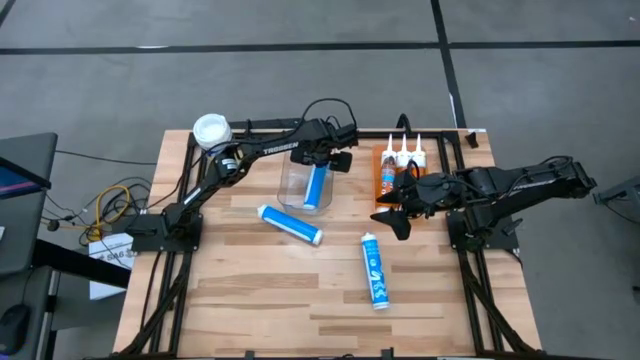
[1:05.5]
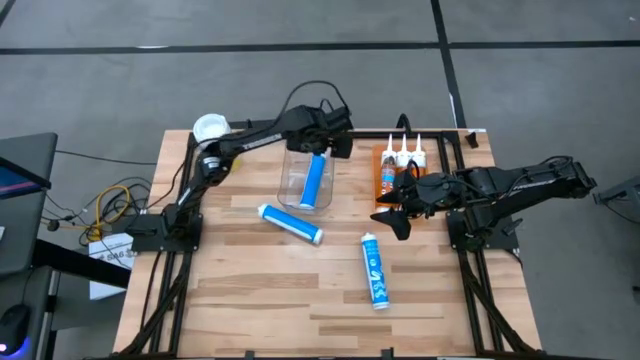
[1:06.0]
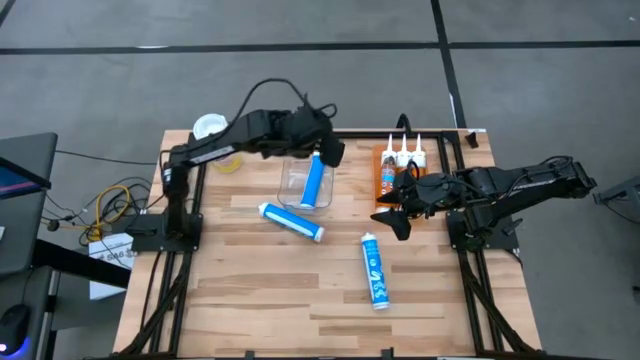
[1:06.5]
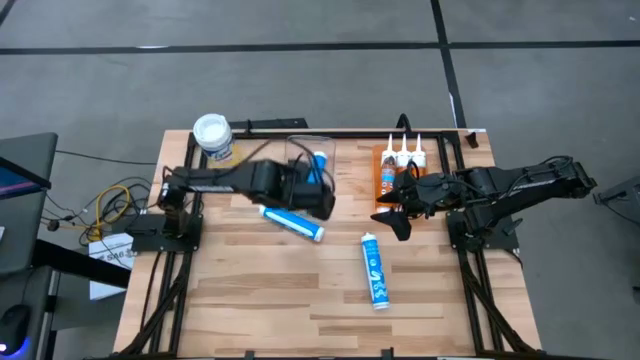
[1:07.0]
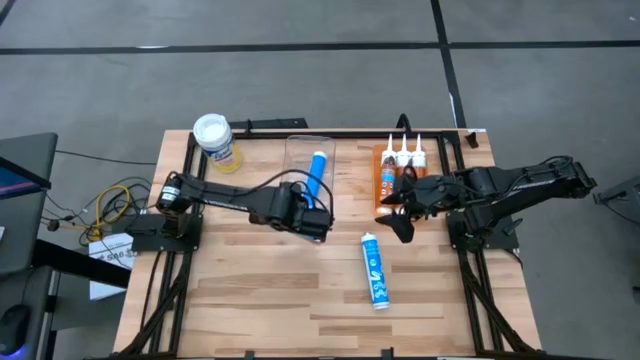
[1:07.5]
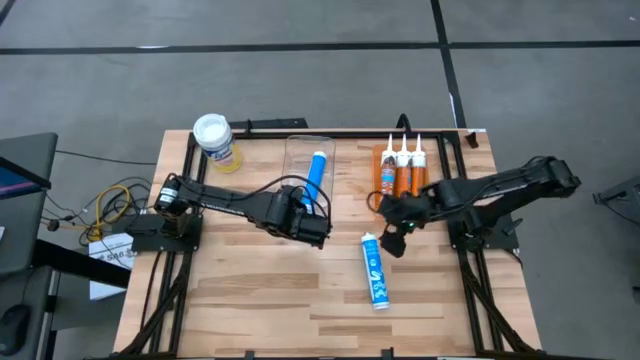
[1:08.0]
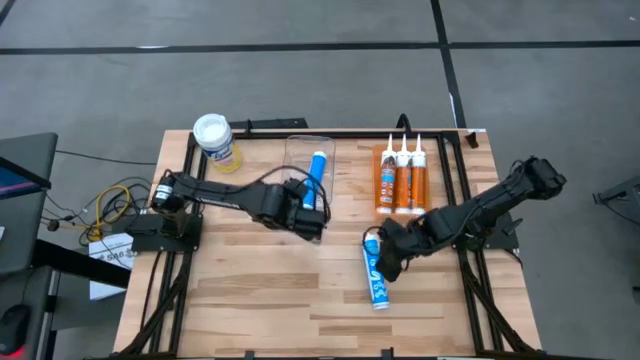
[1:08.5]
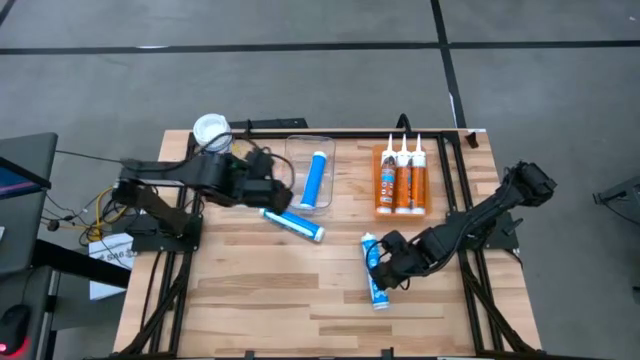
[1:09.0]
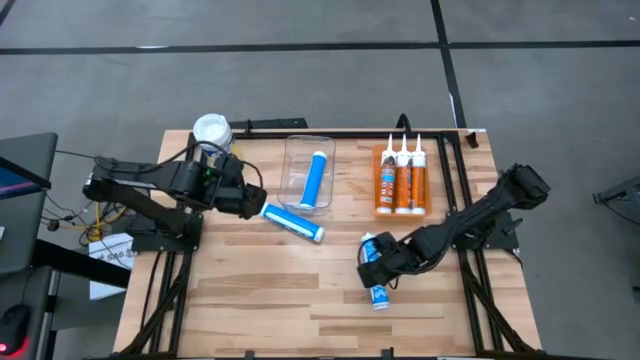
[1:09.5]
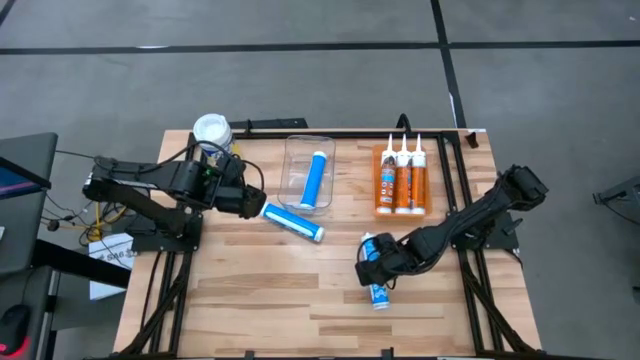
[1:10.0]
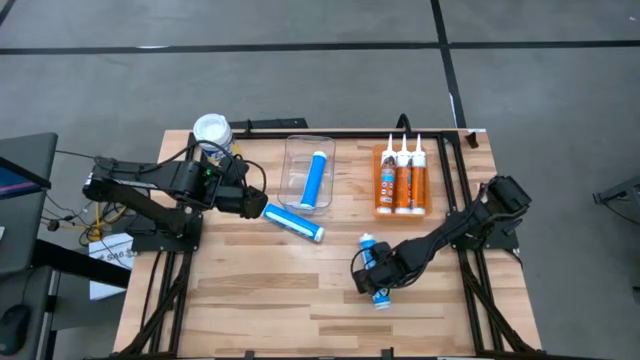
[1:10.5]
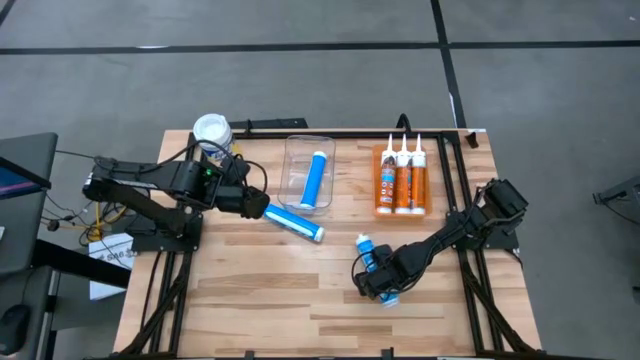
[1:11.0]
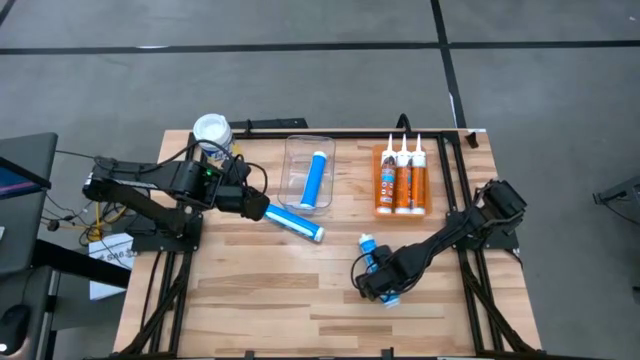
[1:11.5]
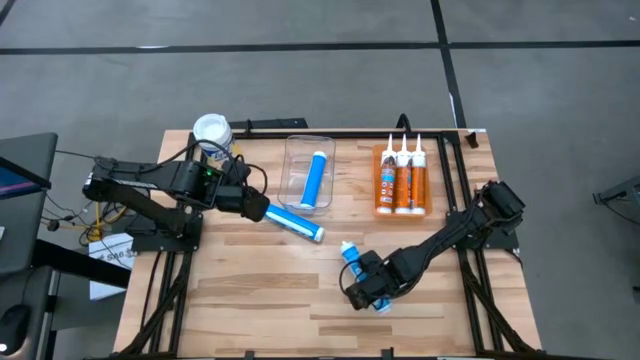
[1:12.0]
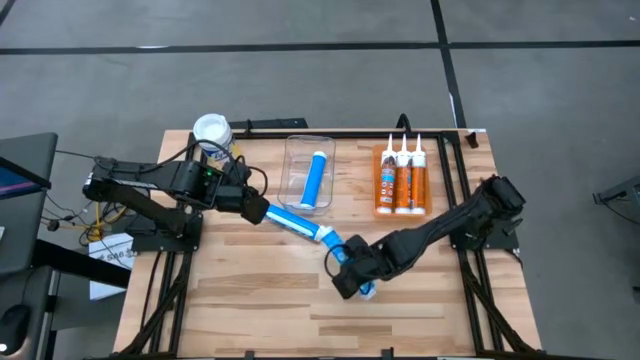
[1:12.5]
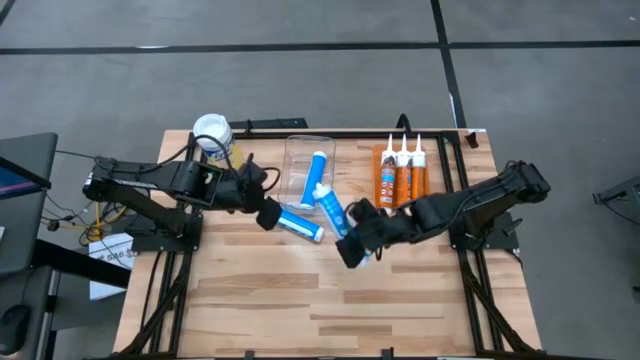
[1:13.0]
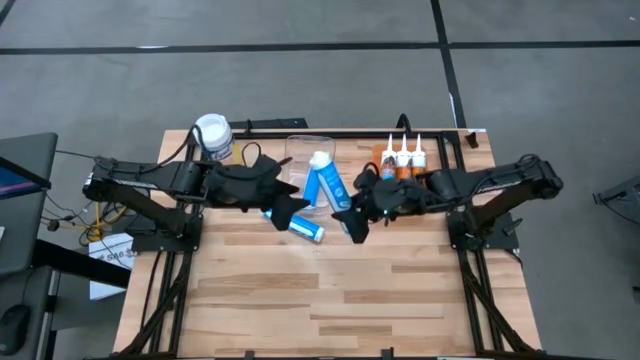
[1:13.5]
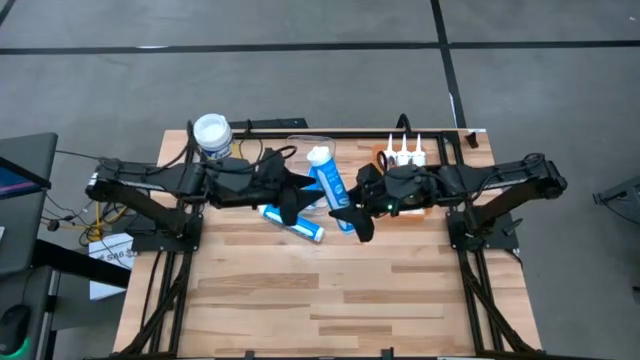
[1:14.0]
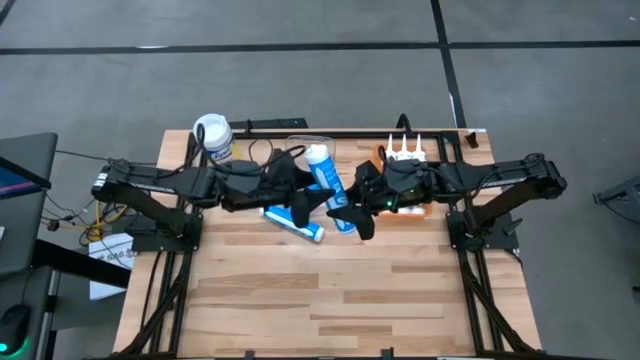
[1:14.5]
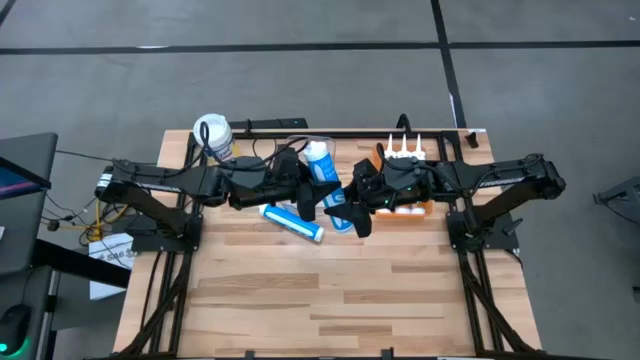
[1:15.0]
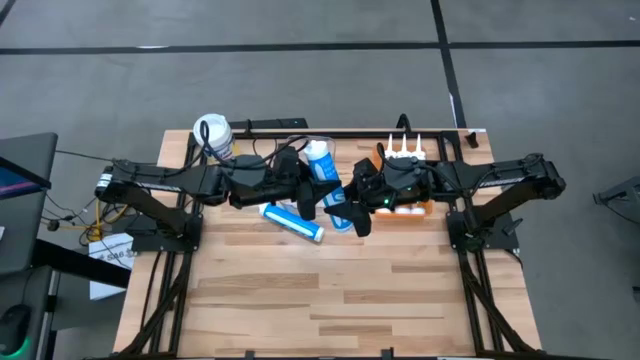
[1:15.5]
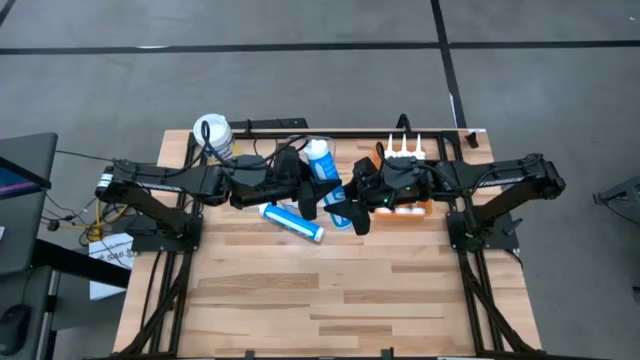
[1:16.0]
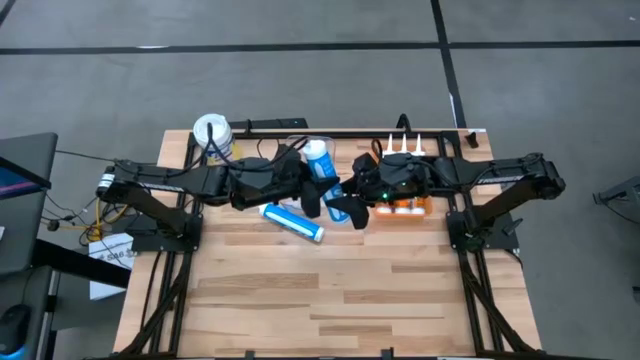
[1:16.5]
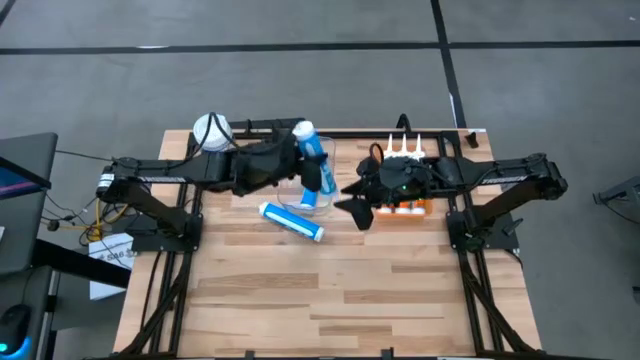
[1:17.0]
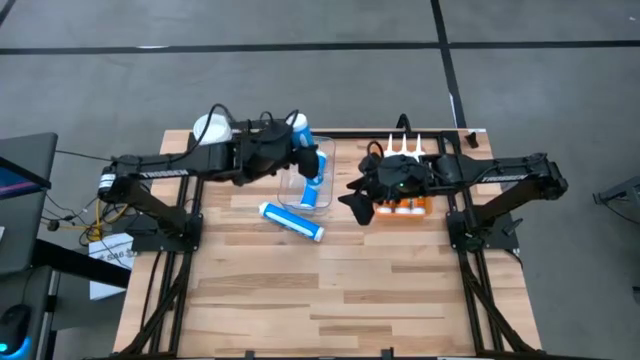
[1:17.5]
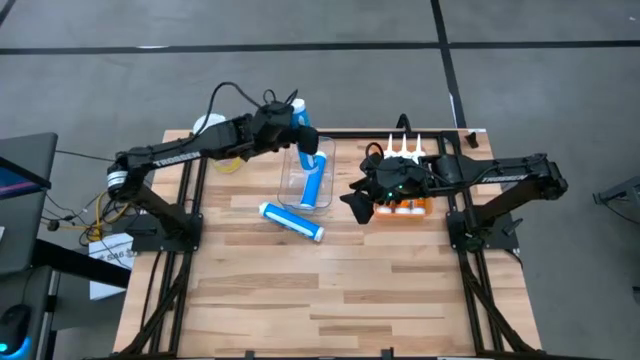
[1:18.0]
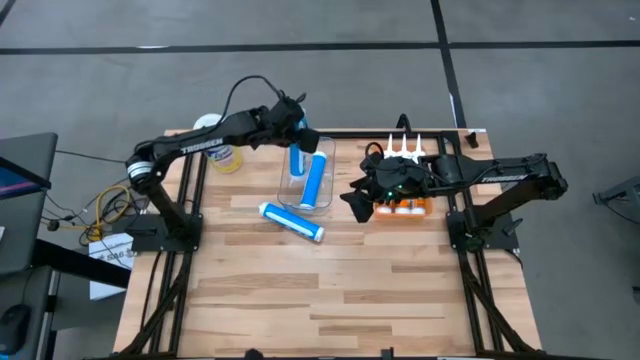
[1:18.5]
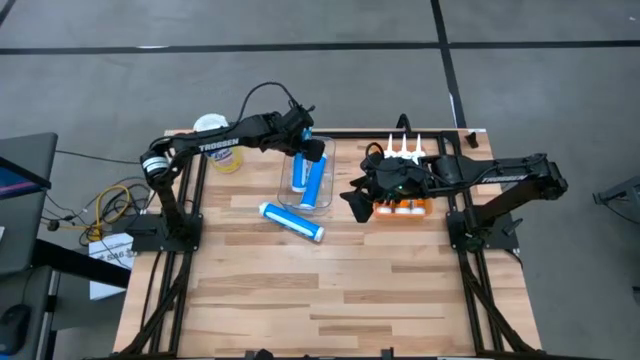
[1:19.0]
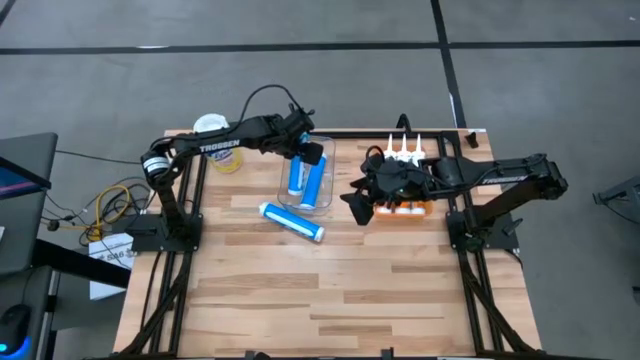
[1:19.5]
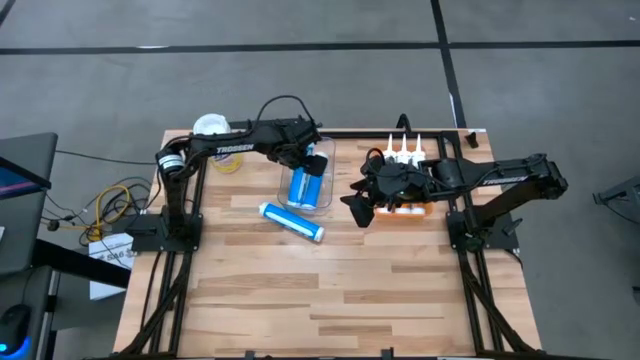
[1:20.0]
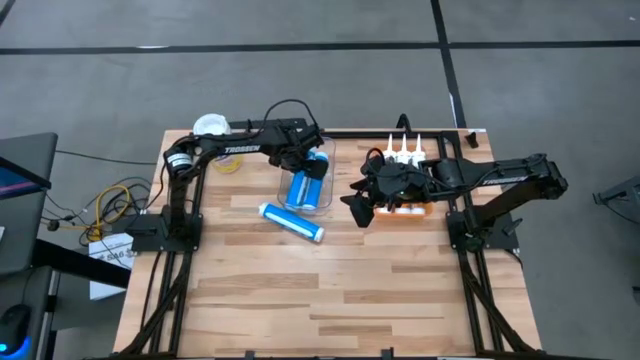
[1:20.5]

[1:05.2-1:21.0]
Task: Pick & place silicon tubes, Sealant and Lysol wipes
Put the right blue sealant into the transparent bin

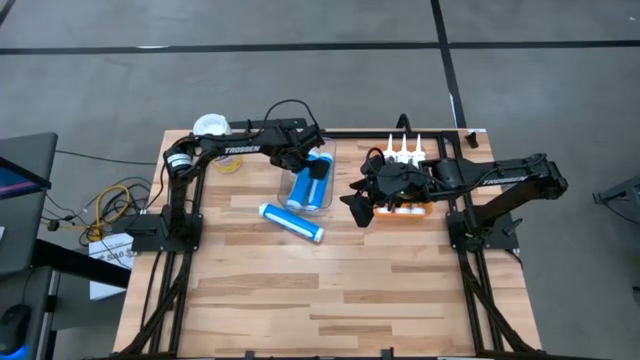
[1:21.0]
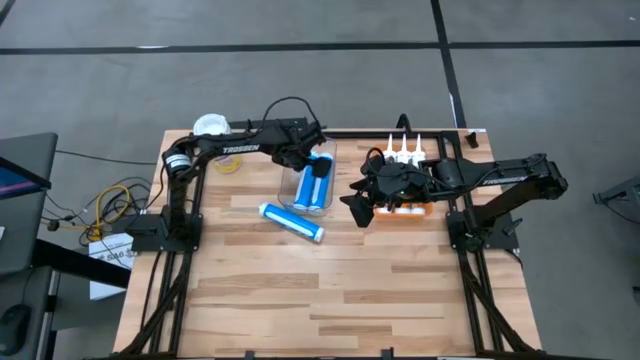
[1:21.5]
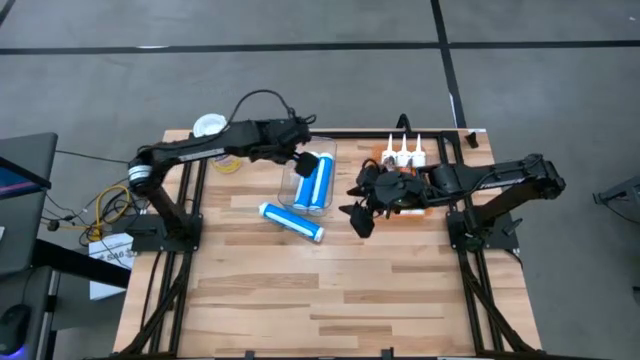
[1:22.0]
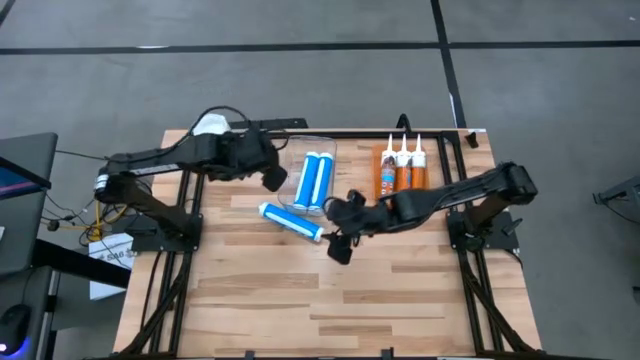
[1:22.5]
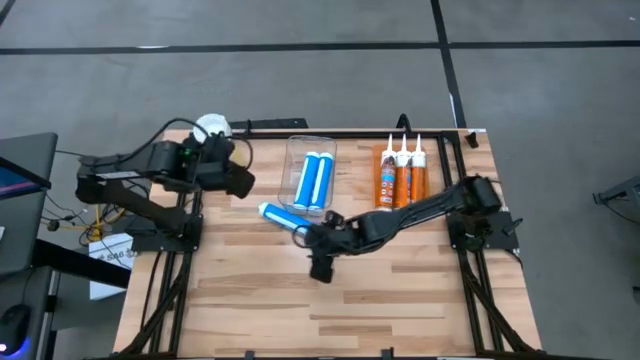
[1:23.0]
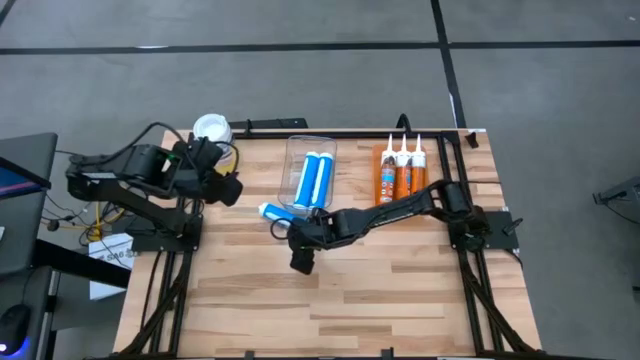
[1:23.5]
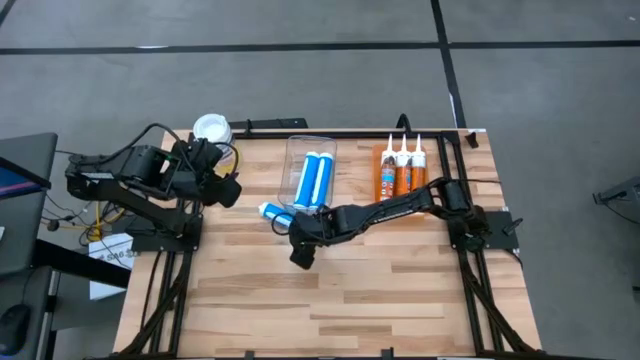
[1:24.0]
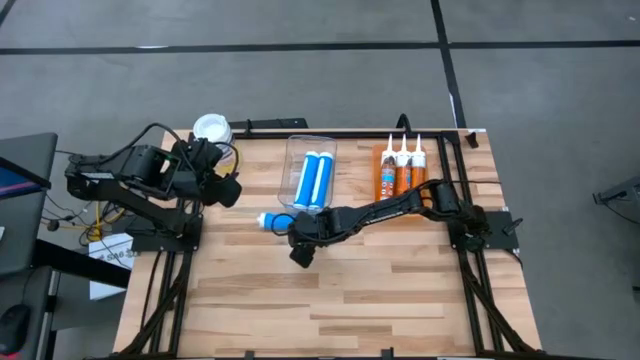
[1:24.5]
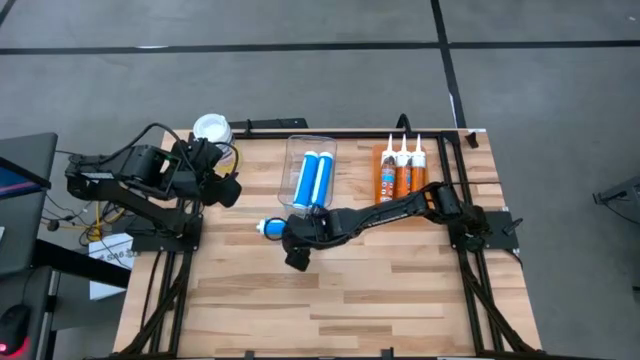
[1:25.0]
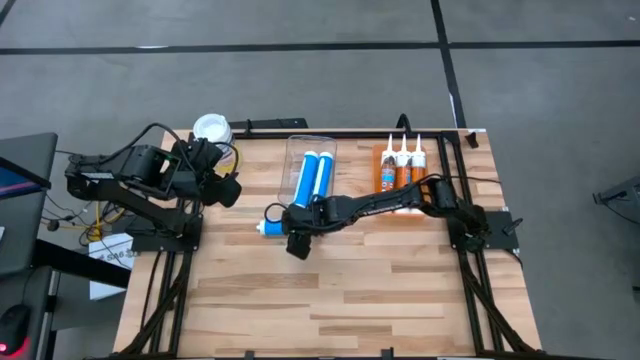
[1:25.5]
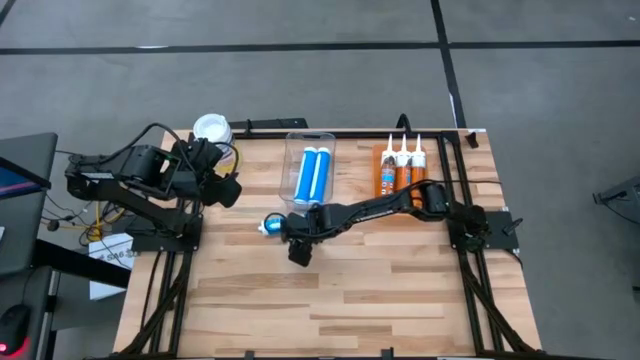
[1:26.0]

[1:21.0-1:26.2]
Put the blue sealant into the transparent bin

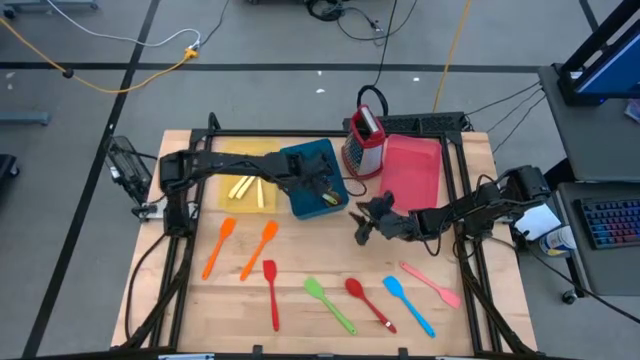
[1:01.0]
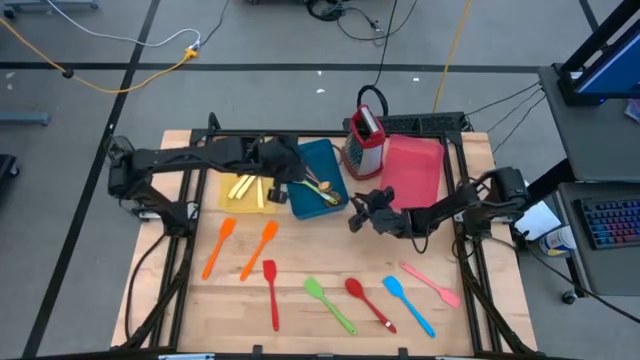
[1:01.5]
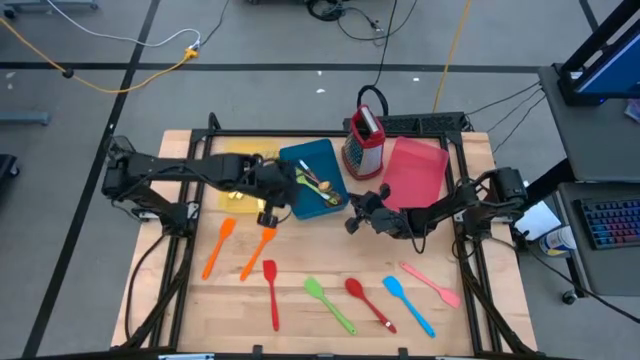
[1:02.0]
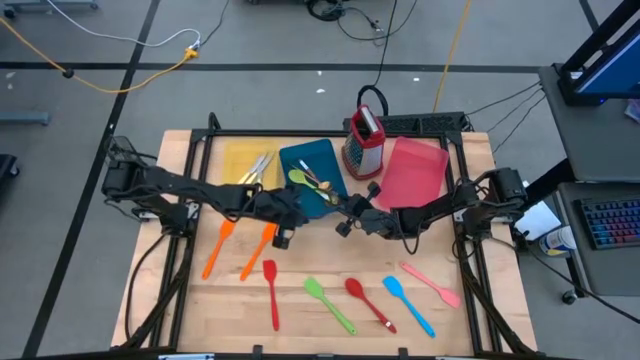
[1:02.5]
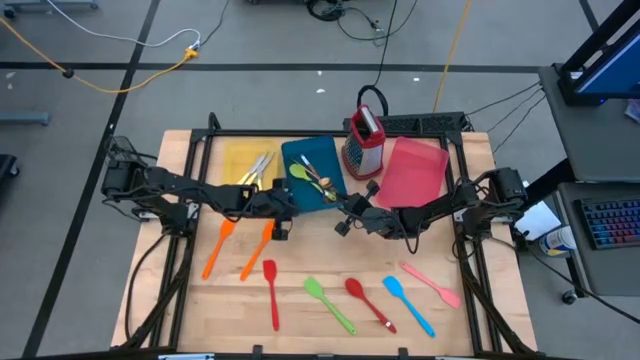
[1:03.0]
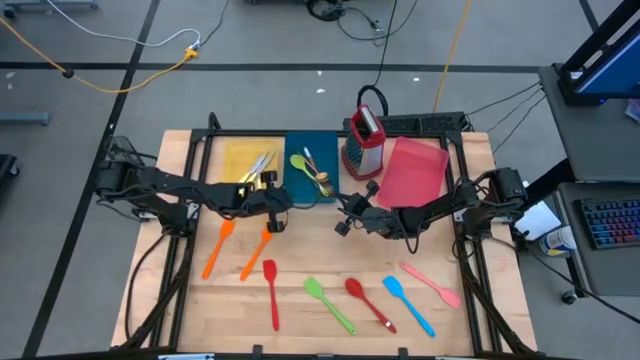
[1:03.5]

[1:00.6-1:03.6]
Task: Pick & Place Kitchen Items
Adjust the blue bin
